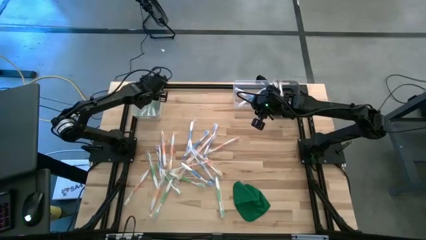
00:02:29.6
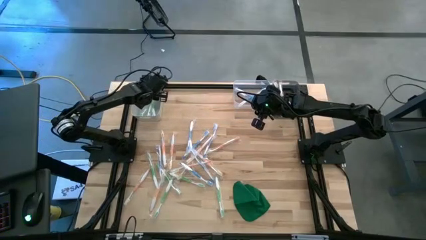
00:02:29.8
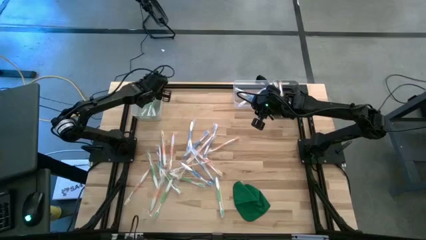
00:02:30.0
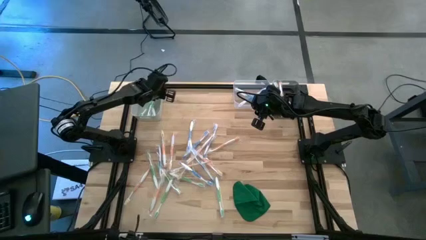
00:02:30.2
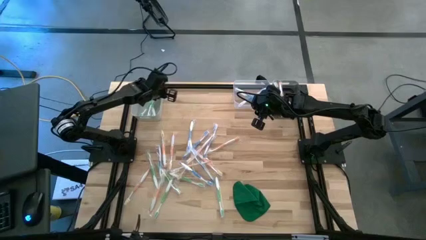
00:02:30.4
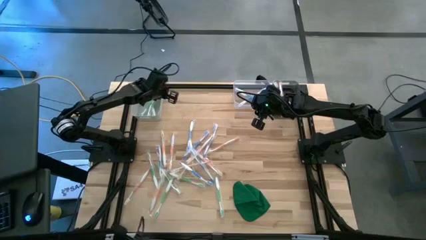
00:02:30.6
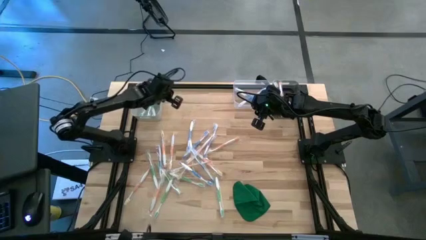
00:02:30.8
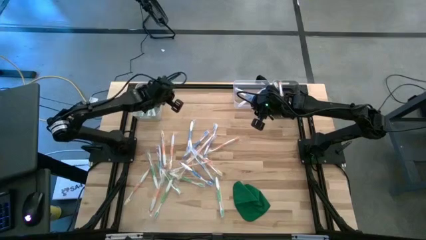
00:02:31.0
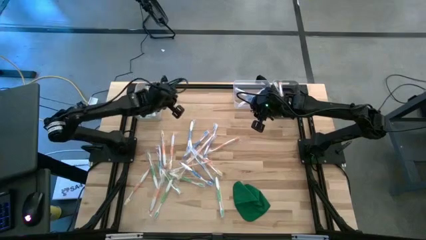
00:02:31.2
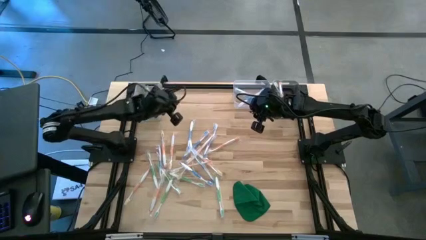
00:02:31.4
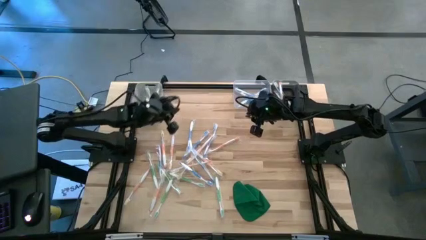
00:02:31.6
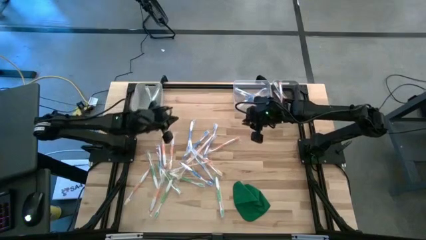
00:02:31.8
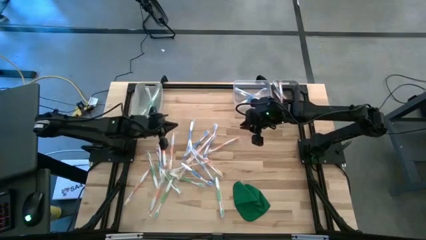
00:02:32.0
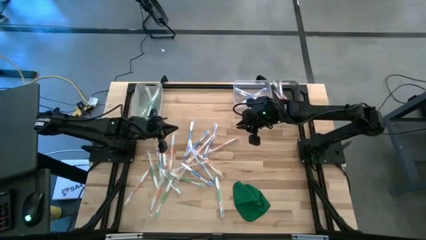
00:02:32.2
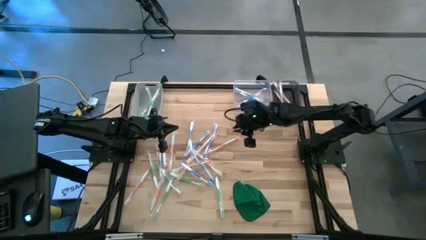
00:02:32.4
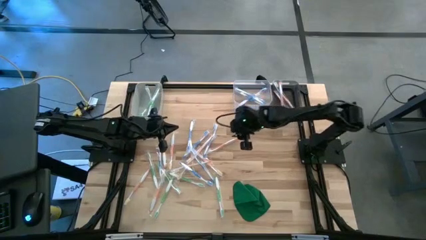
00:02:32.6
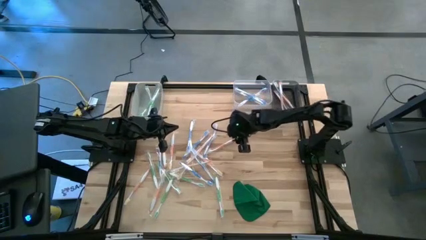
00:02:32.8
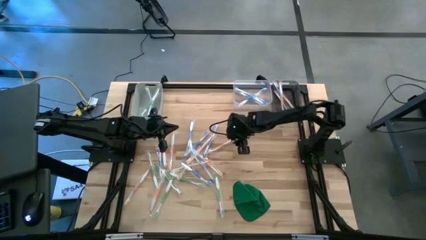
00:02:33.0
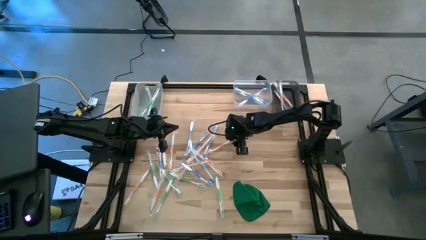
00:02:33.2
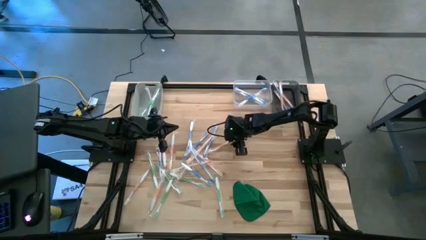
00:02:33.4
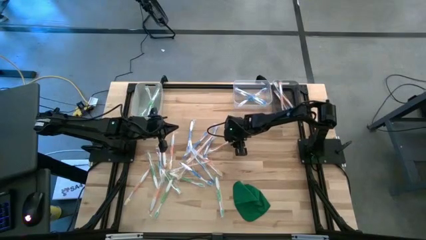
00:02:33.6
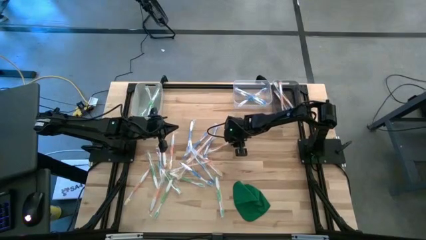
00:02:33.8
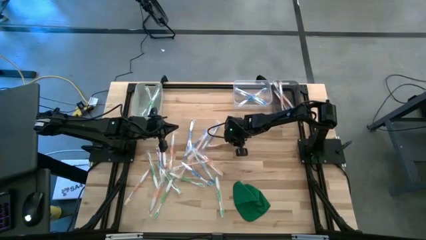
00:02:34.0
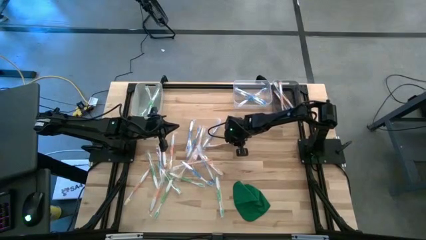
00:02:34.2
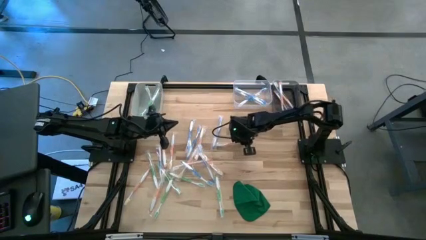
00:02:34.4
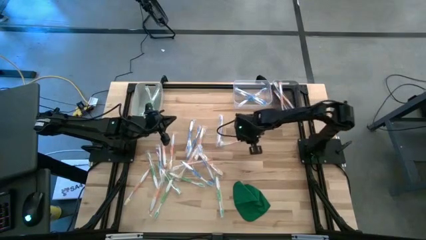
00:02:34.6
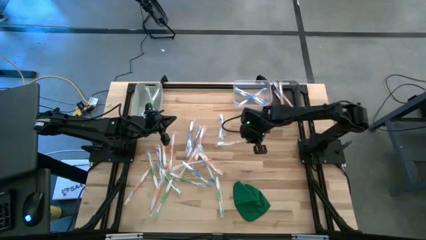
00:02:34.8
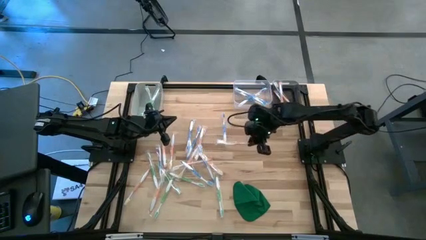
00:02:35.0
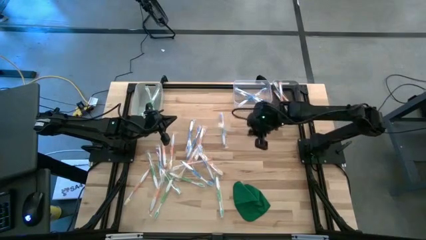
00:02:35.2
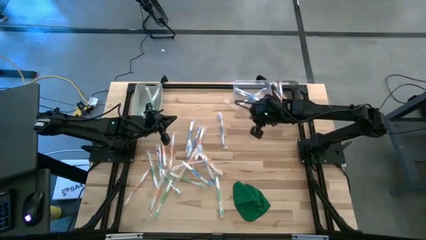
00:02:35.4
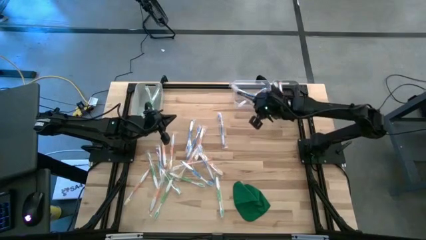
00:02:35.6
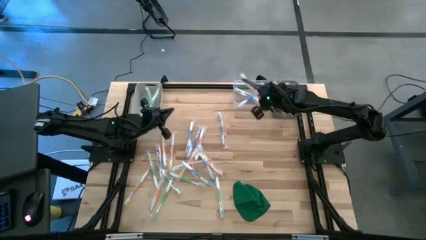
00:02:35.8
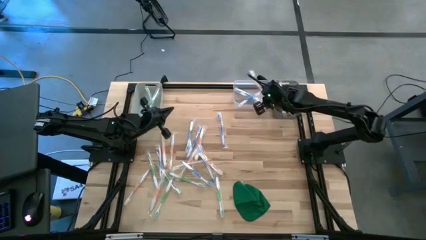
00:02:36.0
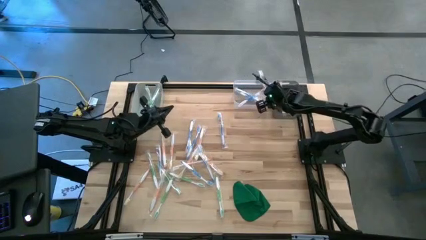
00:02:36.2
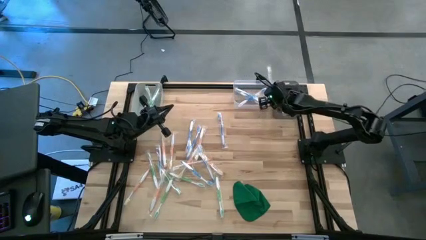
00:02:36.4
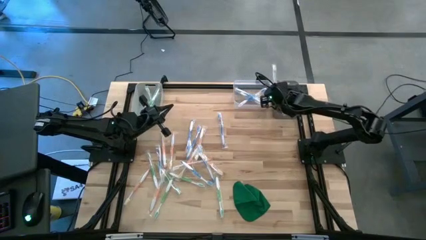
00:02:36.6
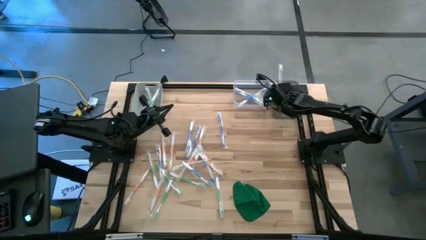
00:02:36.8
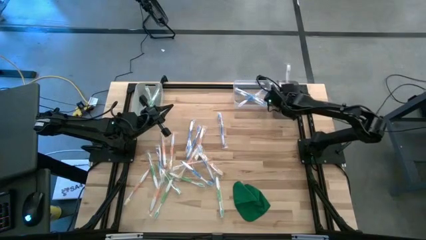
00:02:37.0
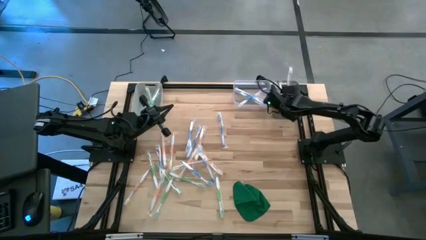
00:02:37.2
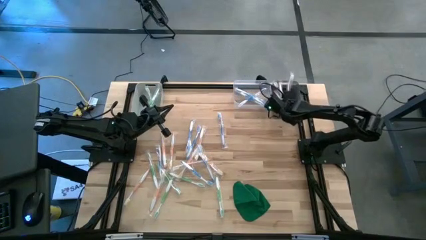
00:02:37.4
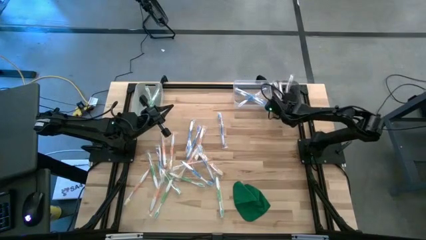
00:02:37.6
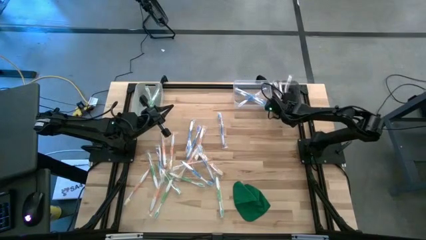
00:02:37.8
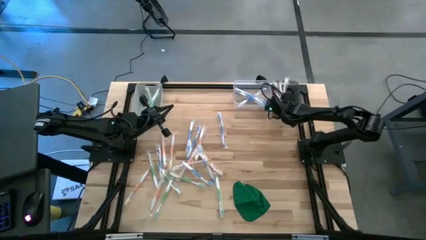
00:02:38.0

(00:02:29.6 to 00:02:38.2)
Task: Pick & Place Toothbrushes
Put the orange toothbrush into the black bin

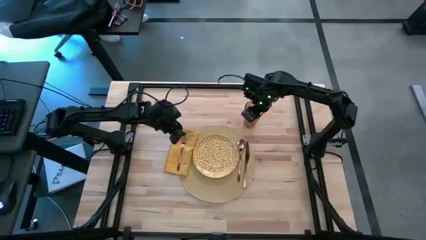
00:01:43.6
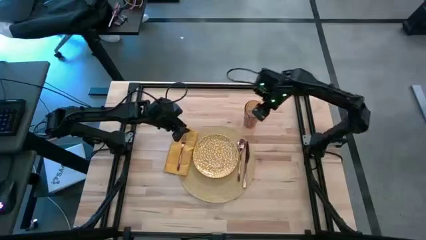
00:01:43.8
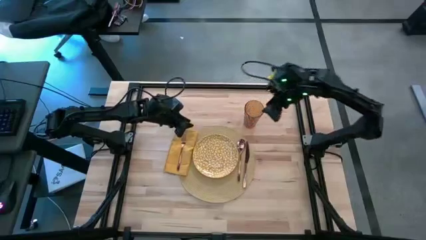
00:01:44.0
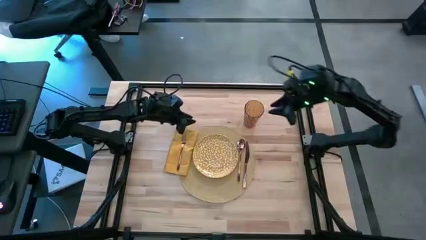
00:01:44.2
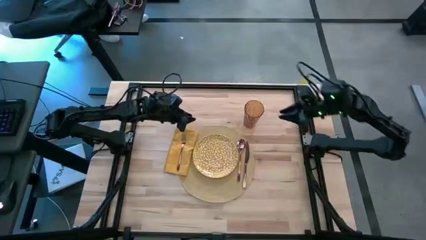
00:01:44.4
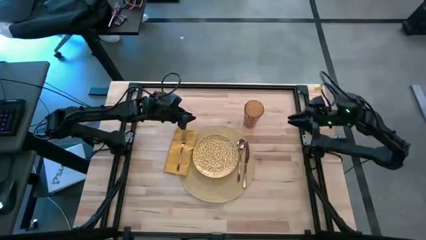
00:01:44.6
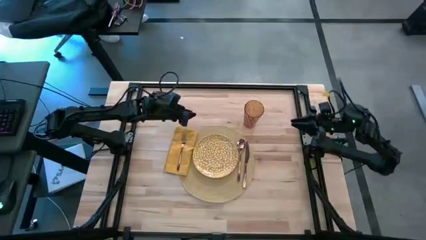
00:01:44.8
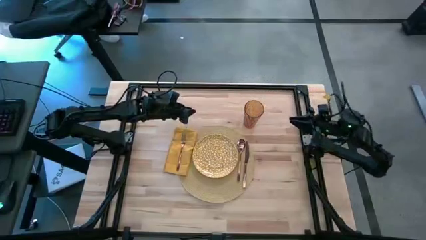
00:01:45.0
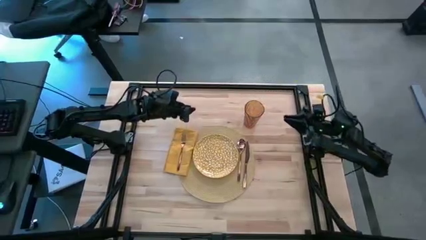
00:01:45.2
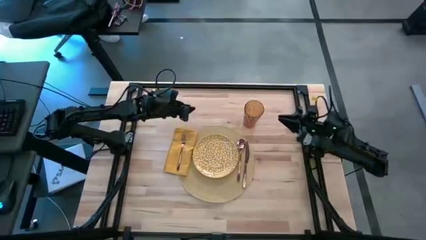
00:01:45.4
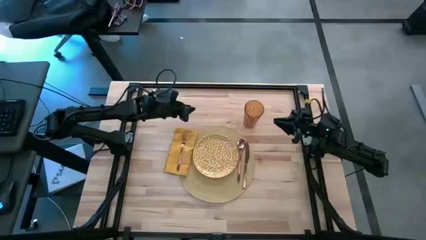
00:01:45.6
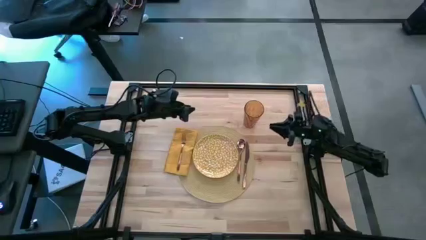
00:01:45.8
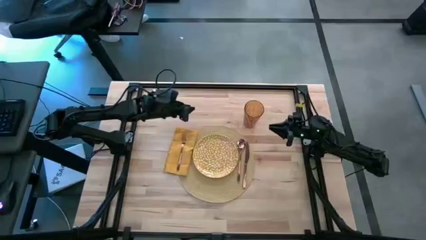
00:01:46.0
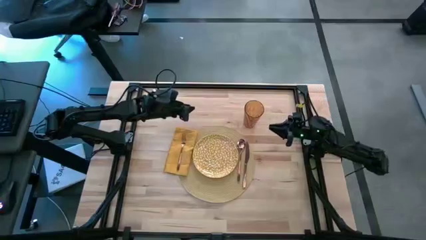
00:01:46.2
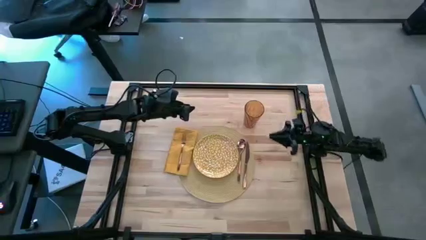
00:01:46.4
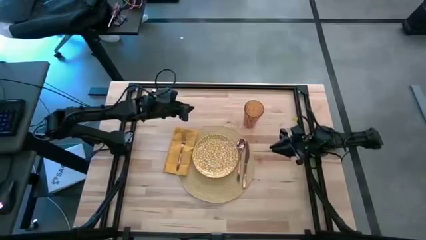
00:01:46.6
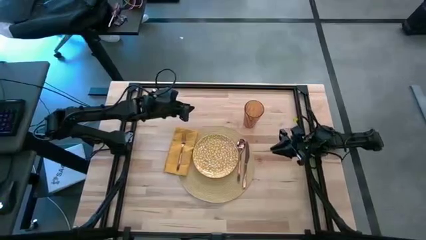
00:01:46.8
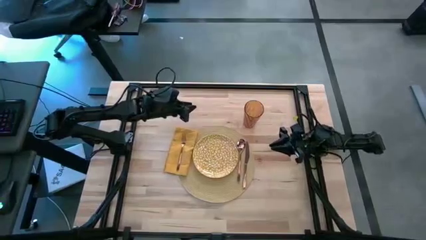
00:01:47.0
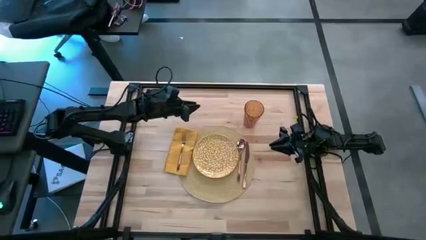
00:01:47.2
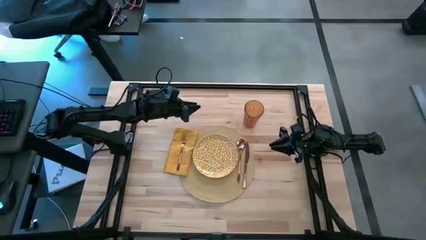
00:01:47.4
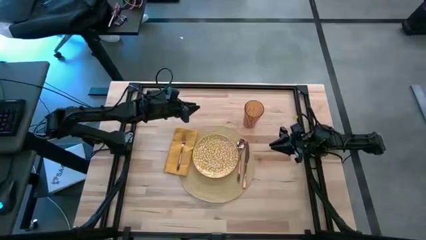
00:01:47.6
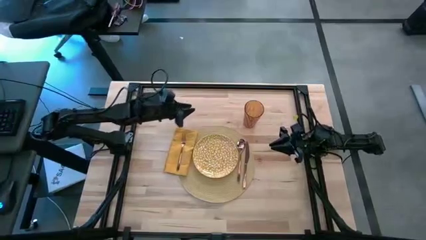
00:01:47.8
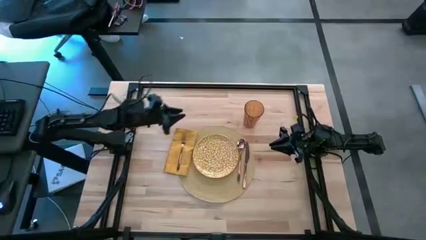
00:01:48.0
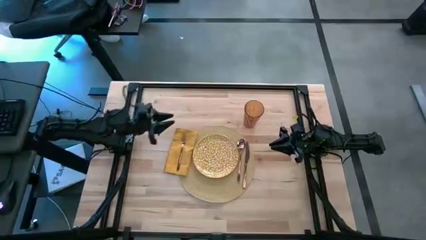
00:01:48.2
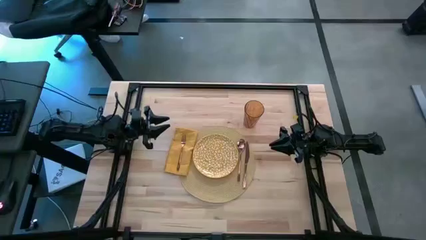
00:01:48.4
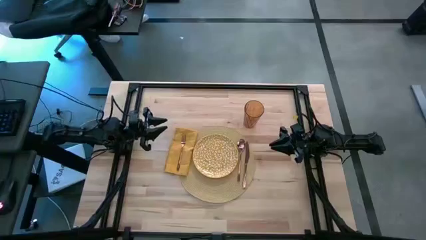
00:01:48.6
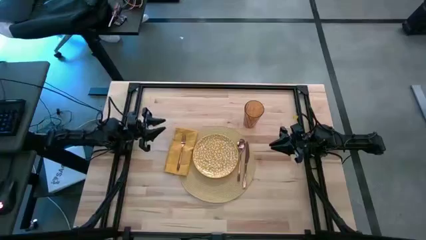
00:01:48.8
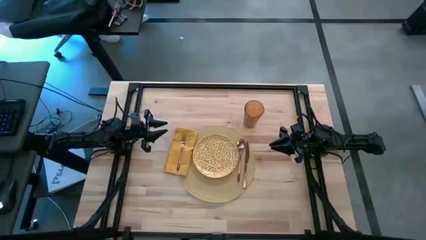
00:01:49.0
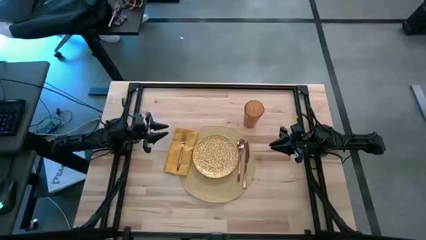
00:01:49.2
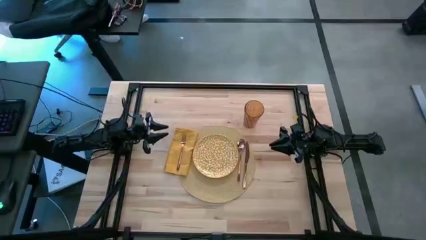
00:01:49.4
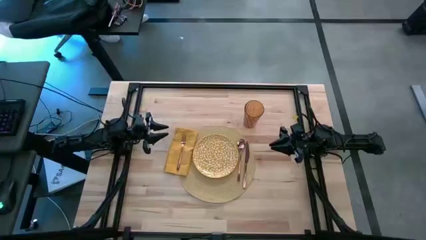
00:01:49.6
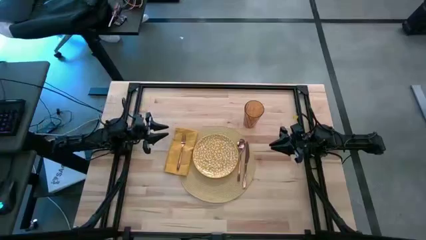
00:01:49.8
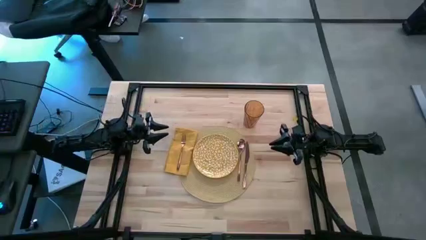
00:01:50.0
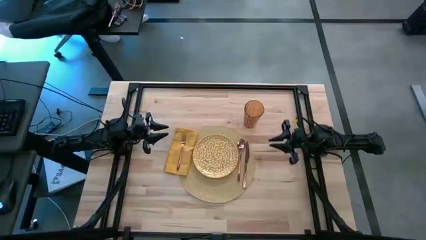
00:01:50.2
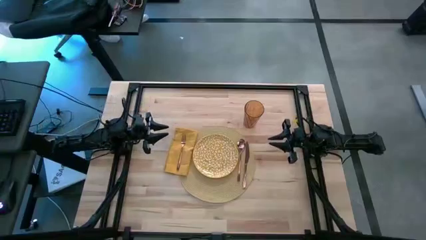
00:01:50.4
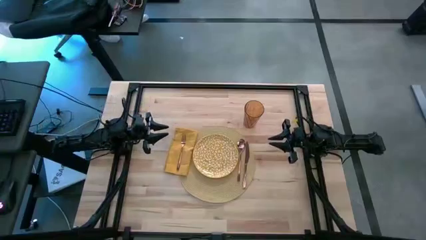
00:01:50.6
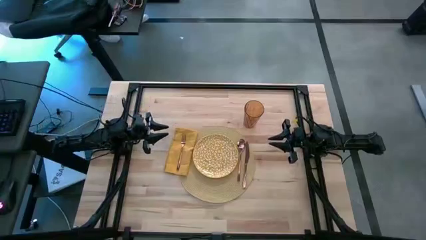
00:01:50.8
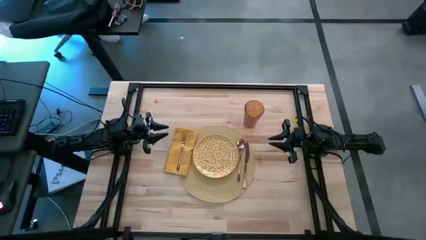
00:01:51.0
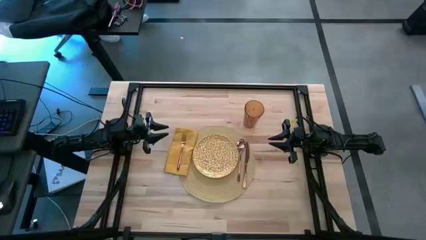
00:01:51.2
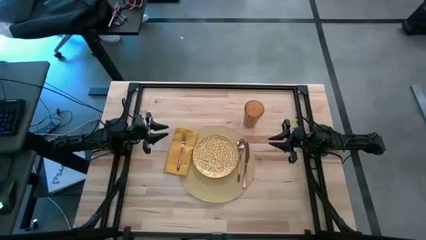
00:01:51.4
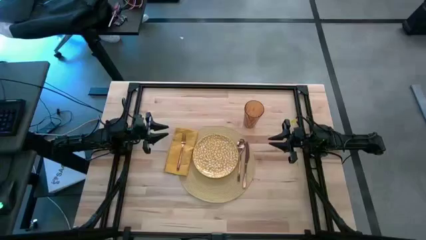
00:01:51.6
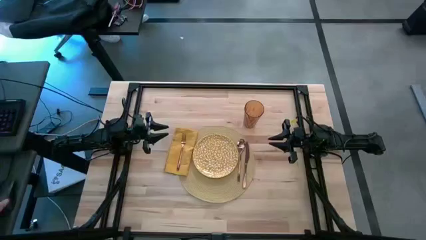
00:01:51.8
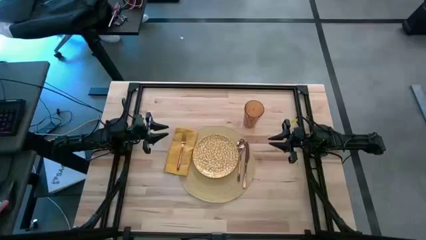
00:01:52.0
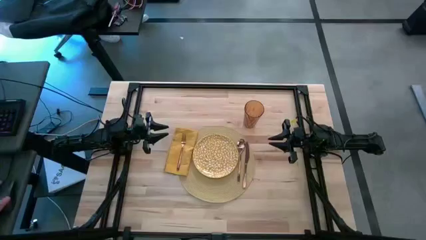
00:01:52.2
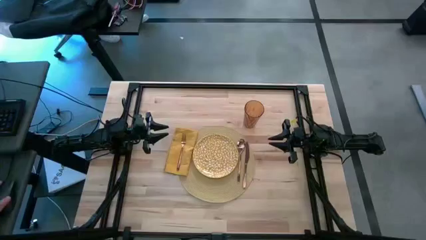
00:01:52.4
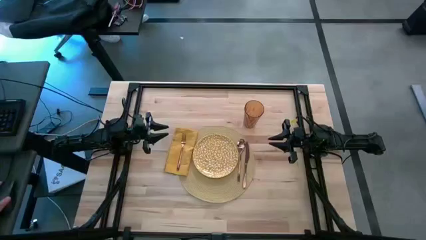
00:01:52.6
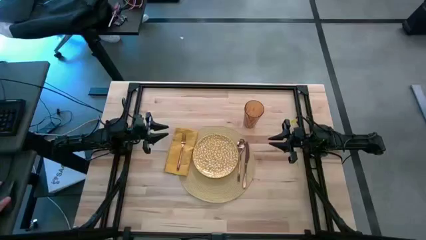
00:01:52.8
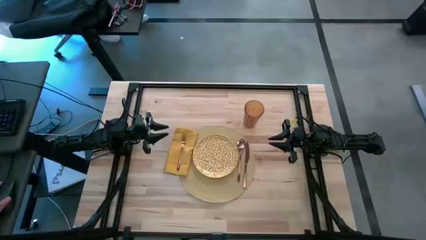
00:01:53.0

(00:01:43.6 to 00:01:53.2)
Task: Set table place
Return to Home Position
